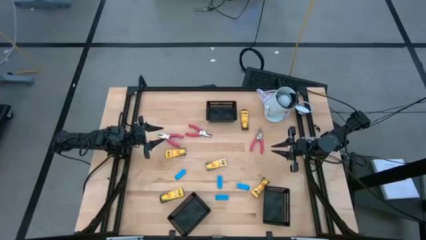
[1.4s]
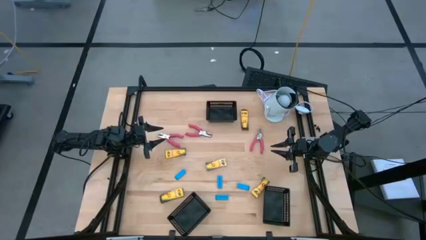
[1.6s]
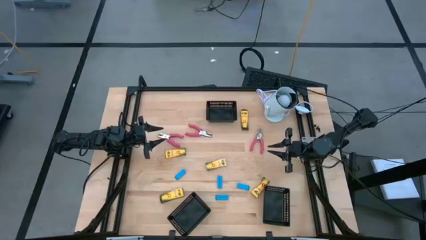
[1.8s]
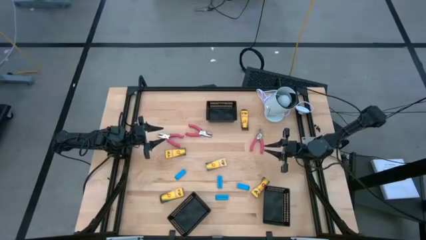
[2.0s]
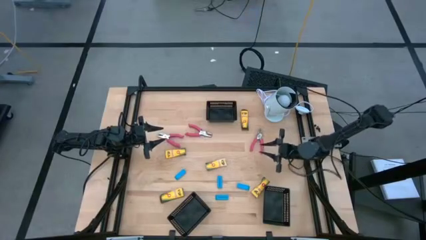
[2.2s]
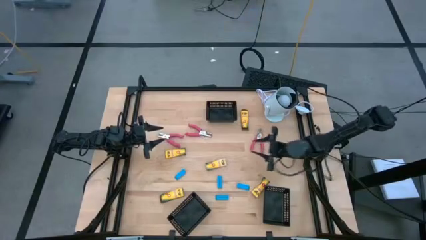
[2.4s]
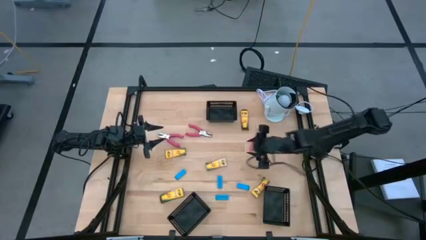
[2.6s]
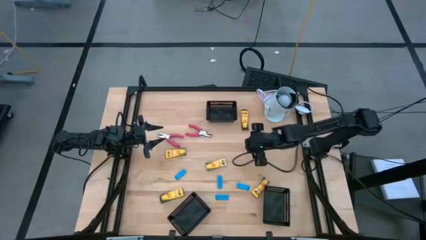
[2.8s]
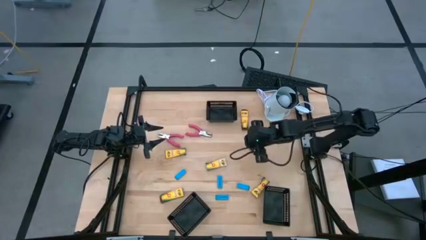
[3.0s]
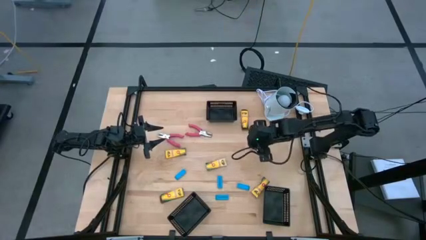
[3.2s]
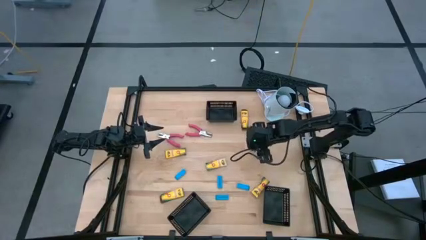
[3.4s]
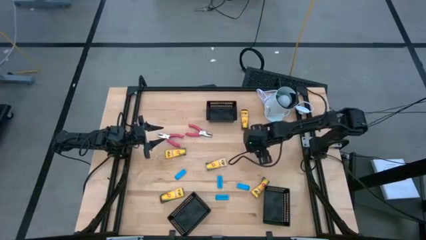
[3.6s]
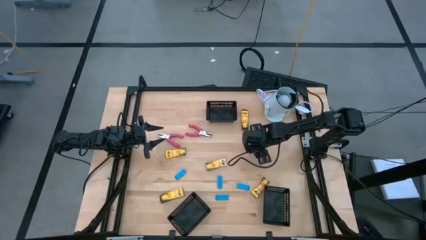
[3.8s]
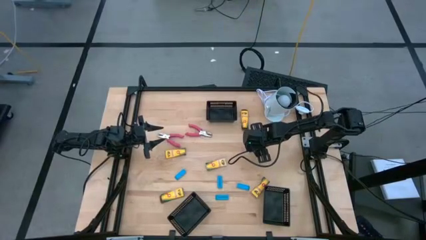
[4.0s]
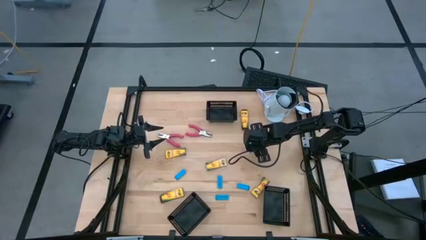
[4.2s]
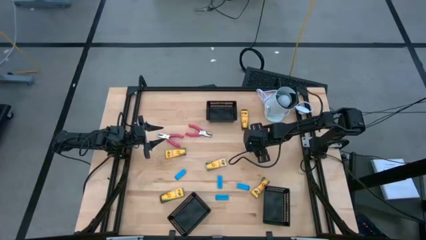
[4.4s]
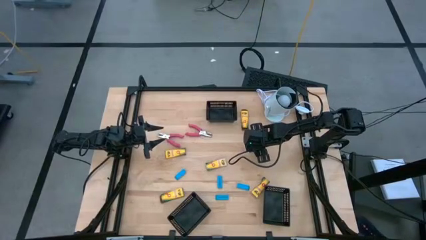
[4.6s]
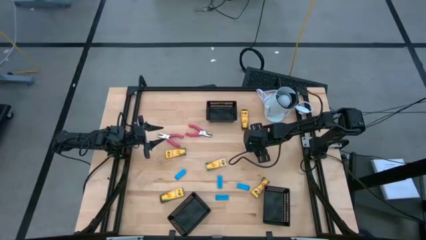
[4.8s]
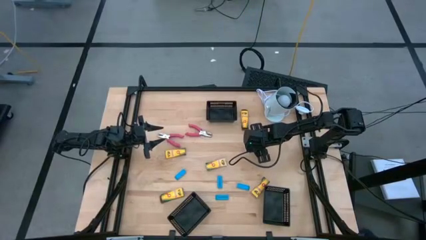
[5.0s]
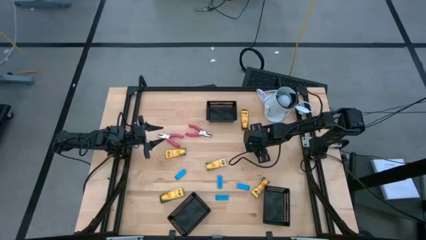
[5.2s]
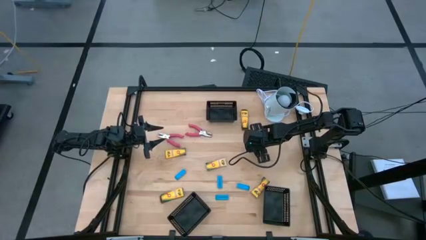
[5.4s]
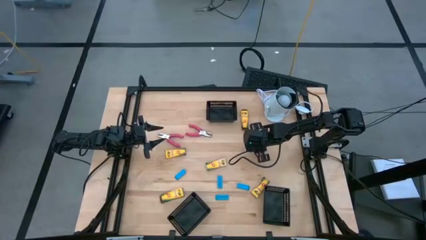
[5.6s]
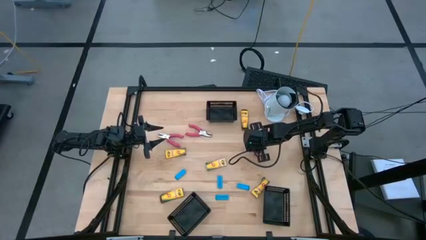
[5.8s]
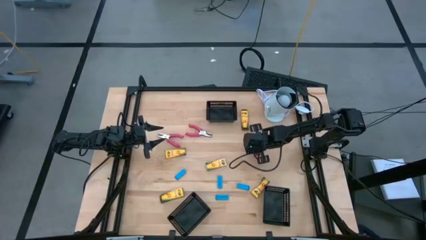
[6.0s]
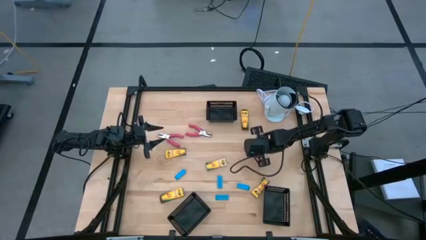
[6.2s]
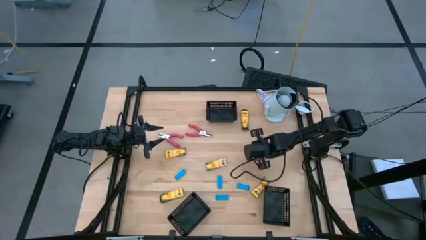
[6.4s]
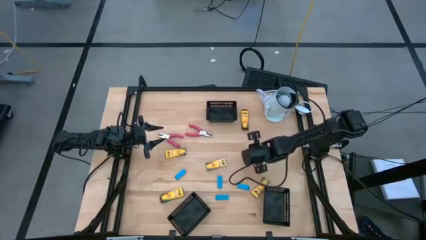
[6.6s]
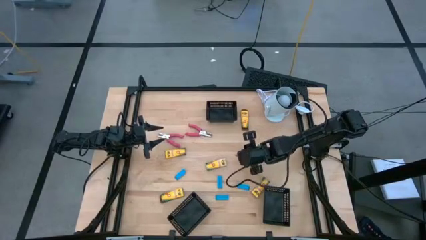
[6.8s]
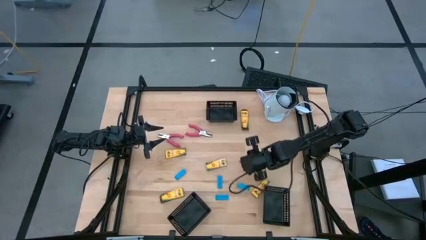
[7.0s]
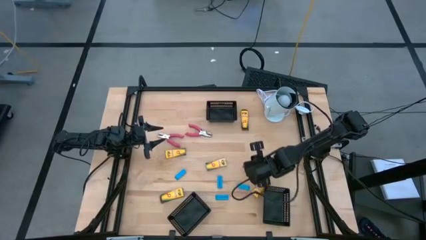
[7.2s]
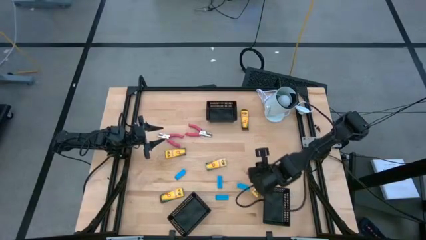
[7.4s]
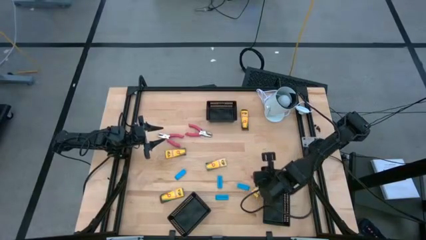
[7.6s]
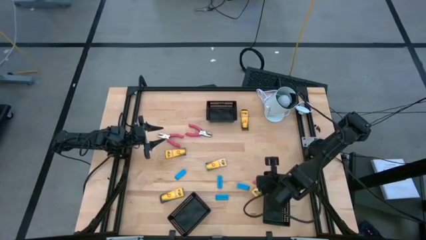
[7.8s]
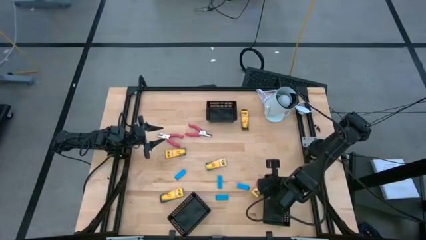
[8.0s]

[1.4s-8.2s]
Task: Pick & Place School Supplies
Put the pink hole puncher into the bottom right black bin

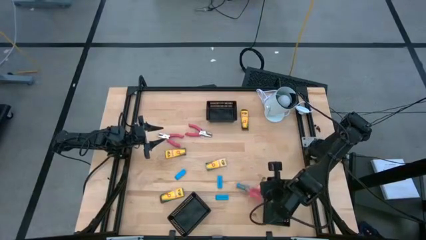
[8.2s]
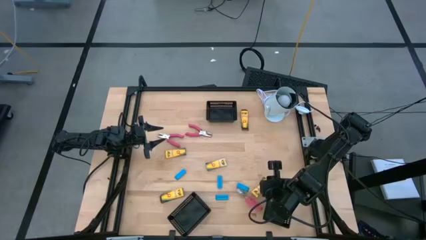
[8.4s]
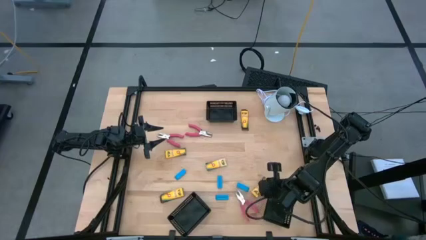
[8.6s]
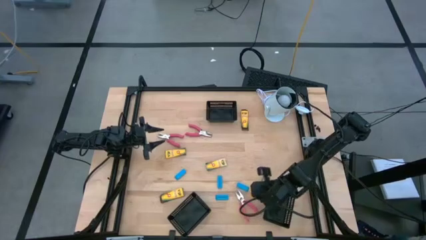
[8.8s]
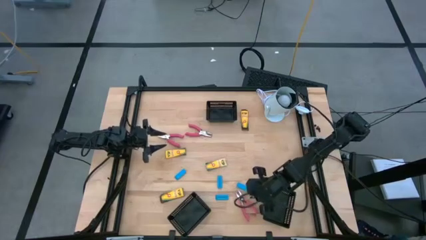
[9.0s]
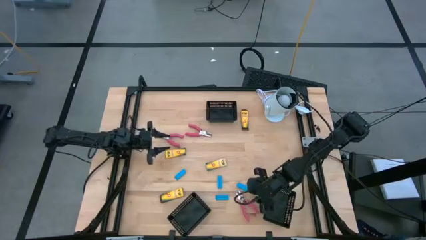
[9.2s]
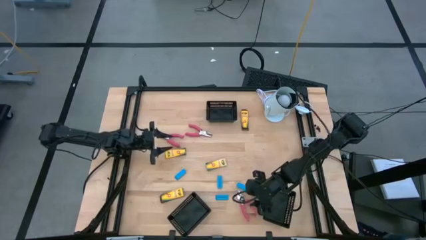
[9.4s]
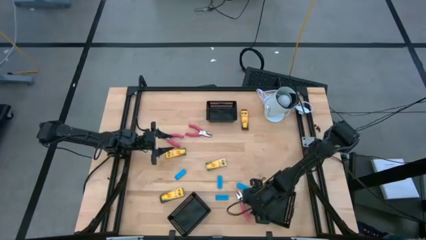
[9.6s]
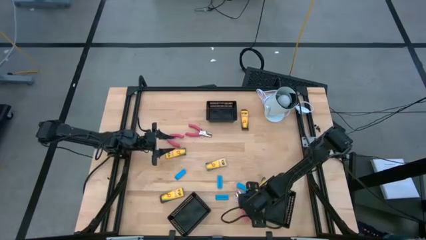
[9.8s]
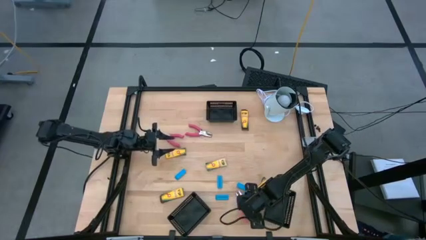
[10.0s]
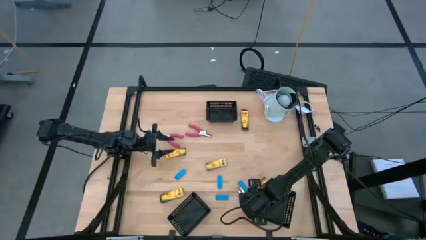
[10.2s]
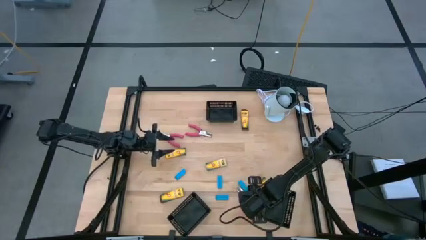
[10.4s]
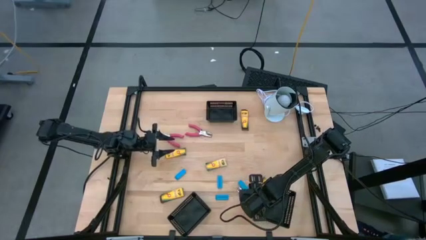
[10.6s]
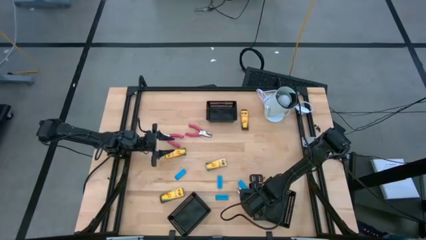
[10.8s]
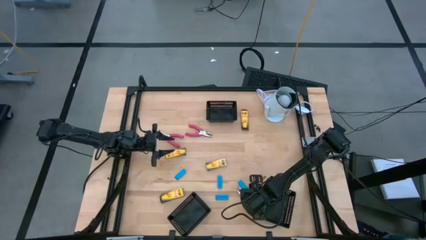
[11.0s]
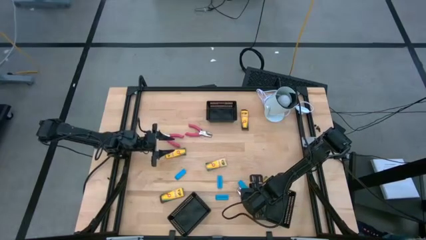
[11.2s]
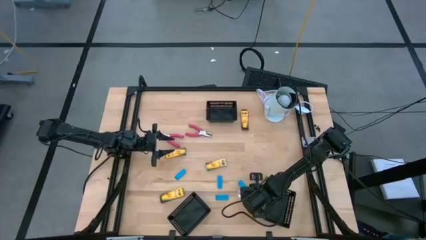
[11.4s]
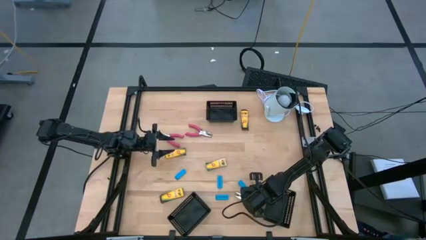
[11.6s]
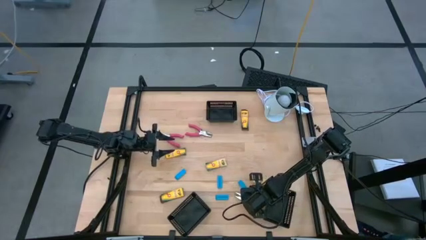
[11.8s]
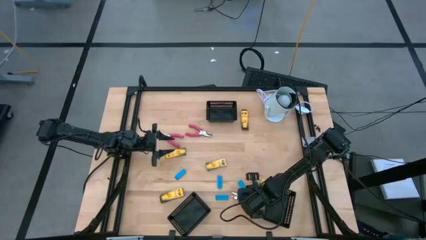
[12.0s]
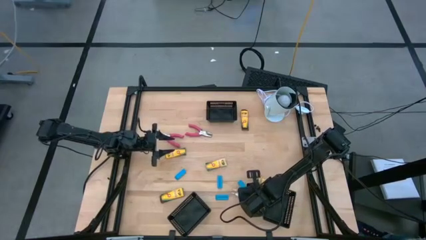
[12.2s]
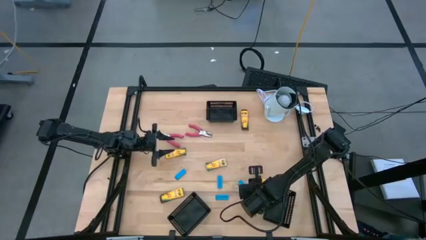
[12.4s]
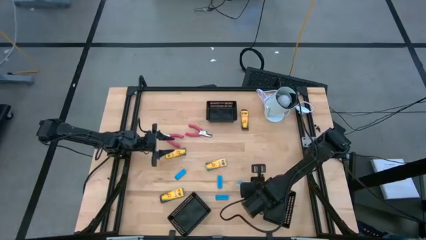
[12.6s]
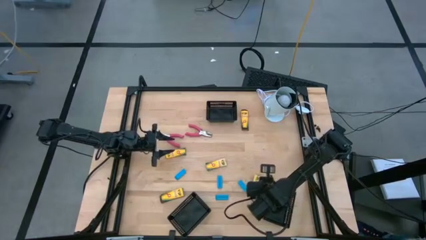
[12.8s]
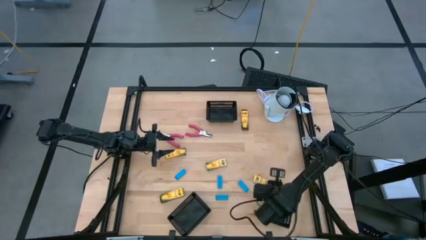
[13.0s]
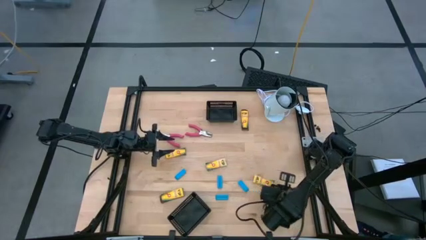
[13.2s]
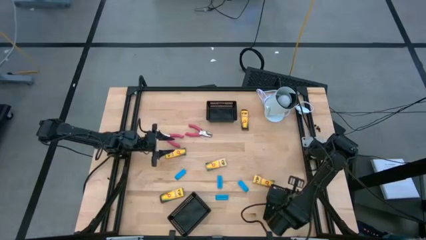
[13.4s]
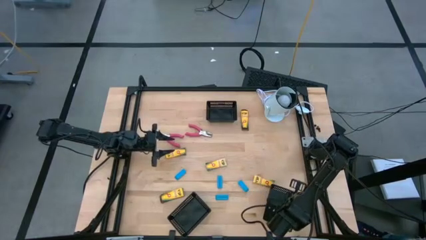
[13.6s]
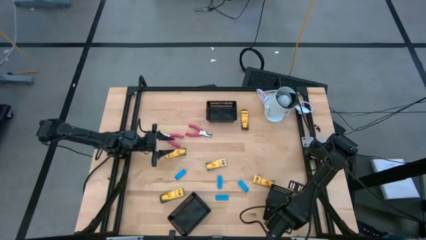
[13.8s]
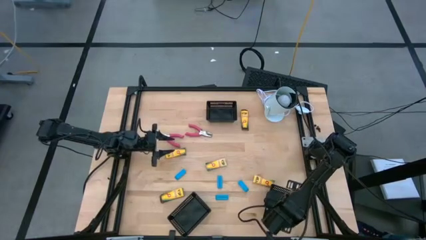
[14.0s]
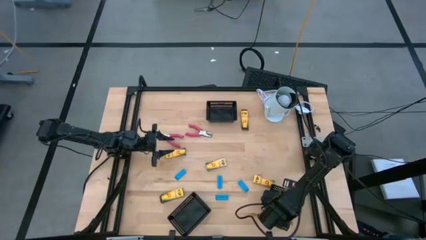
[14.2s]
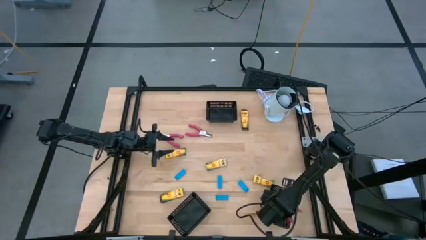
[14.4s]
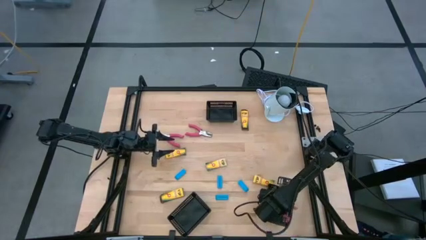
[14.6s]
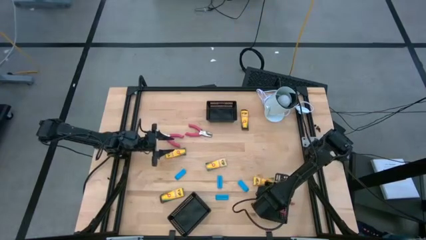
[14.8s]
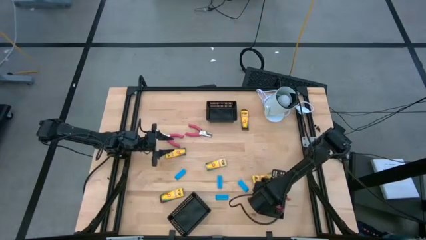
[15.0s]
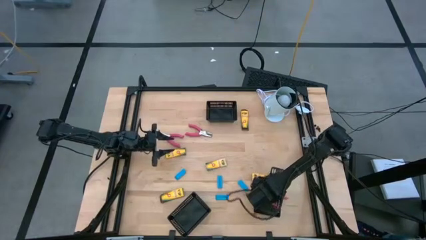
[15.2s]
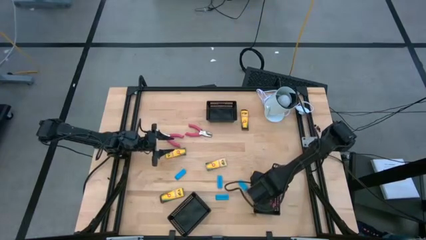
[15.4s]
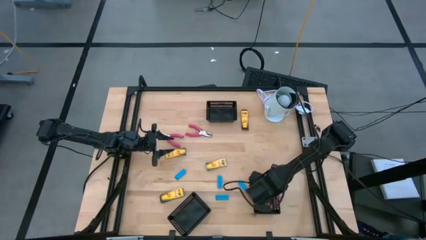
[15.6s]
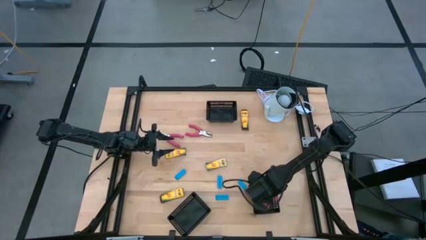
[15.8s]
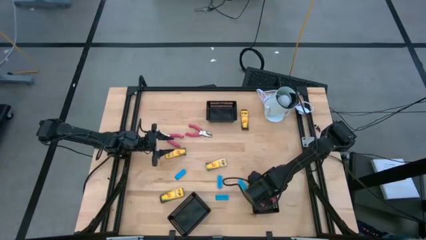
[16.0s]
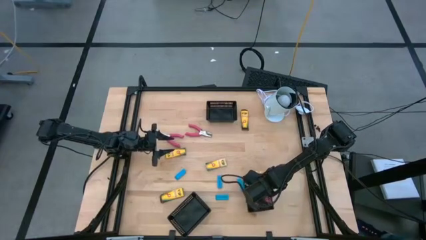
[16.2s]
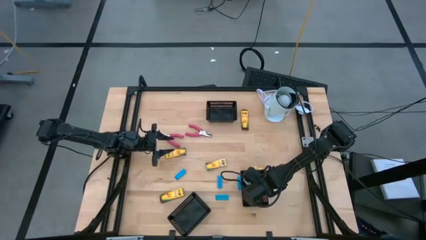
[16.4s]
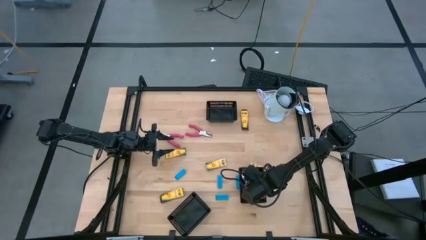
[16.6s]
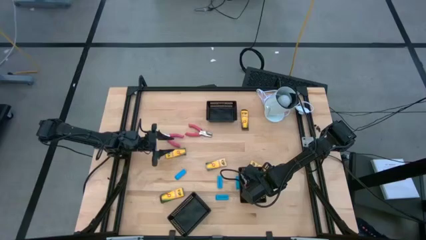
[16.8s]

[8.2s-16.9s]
Put the pink hole puncher into the bottom right black bin

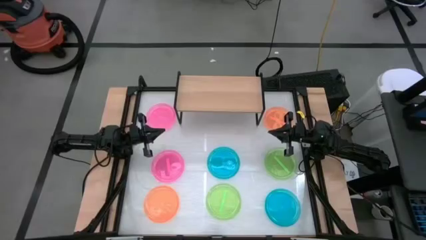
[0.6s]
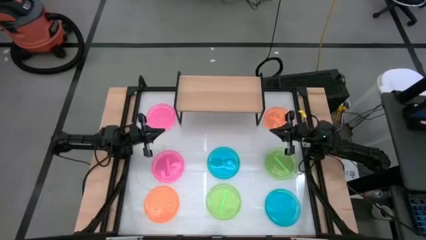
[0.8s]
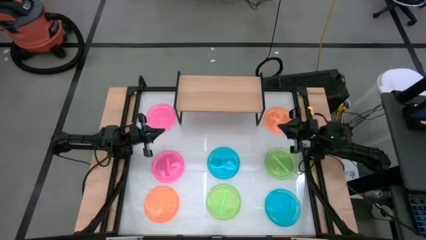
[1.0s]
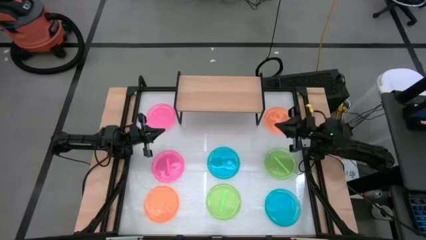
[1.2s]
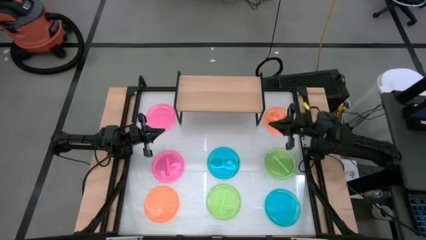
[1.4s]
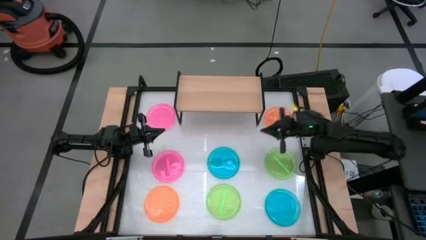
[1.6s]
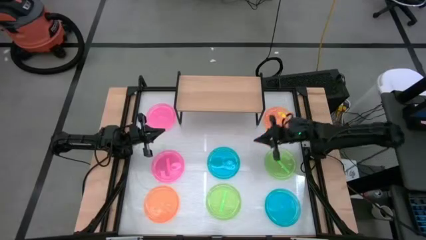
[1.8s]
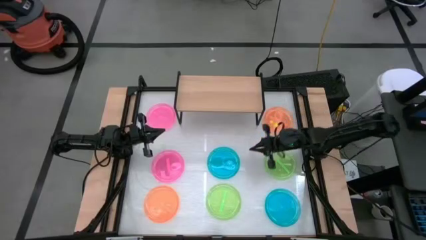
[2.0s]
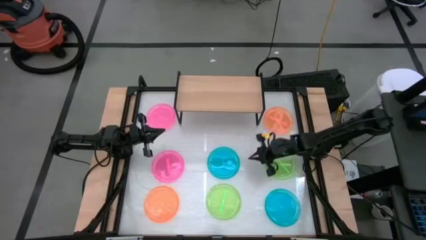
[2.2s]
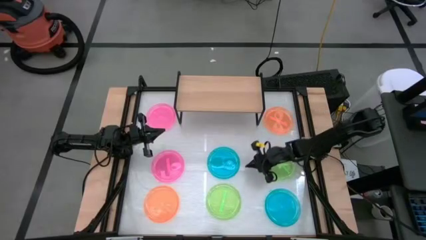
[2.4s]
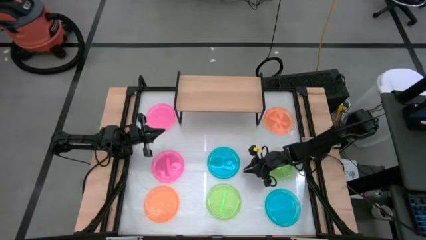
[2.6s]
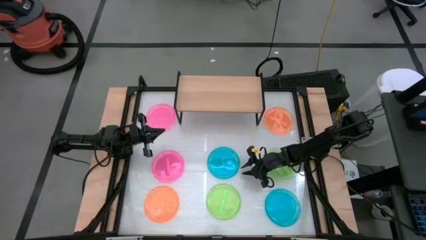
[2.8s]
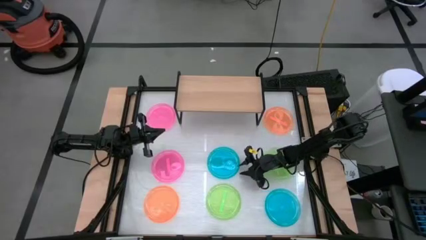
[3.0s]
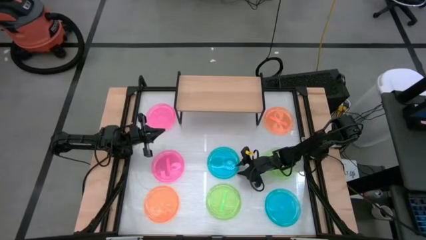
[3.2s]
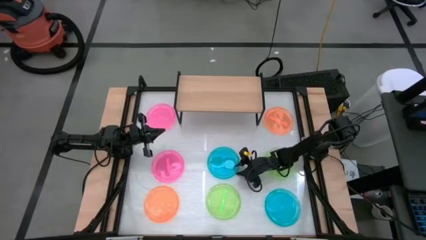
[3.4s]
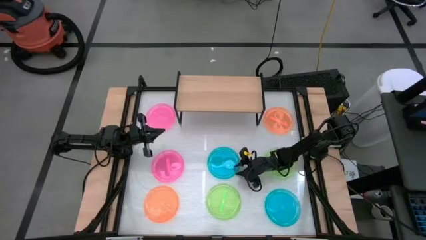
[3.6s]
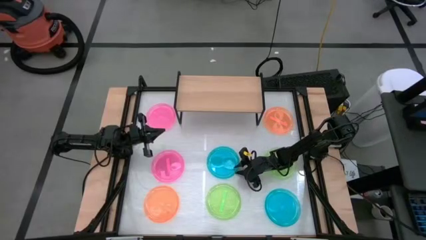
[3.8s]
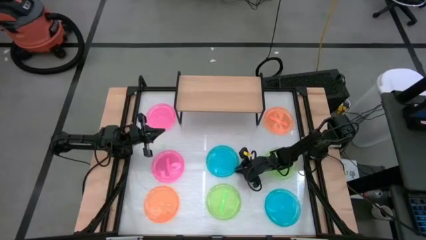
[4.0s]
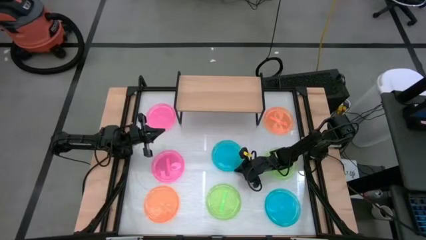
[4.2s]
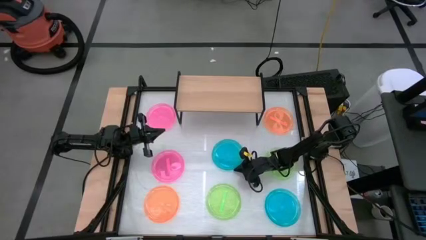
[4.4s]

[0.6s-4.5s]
Task: Place and stack plates onto a shelf
Put the top blue plate on the shelf
